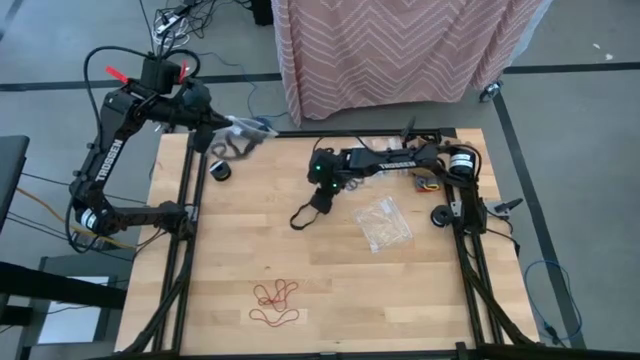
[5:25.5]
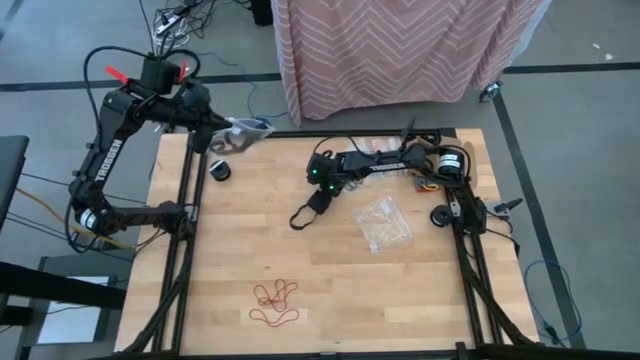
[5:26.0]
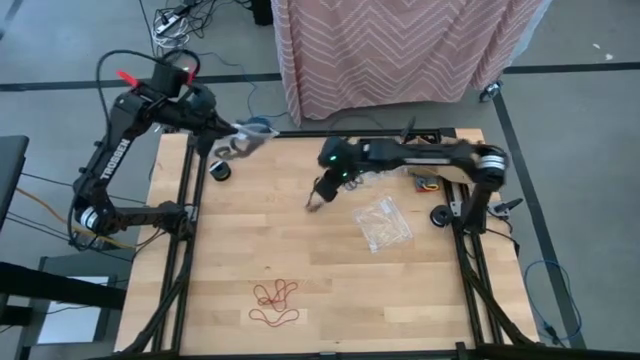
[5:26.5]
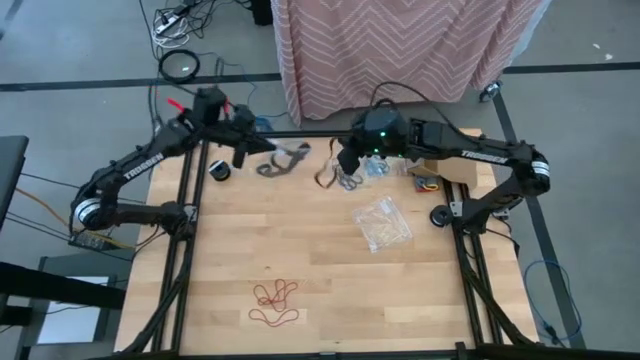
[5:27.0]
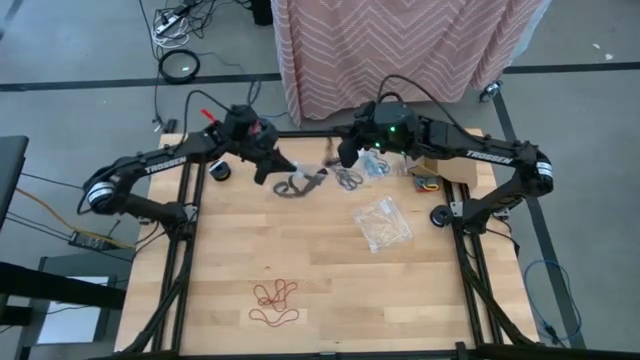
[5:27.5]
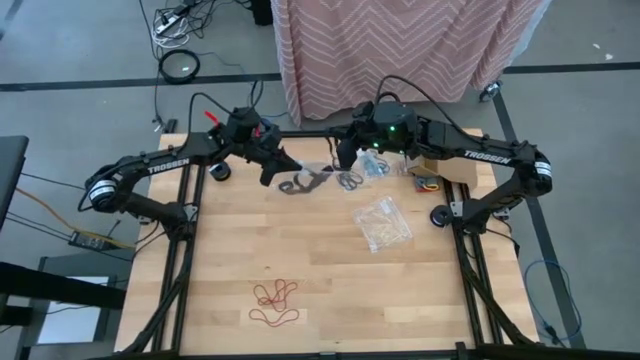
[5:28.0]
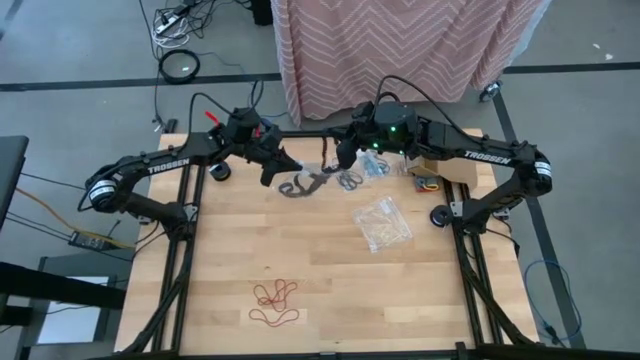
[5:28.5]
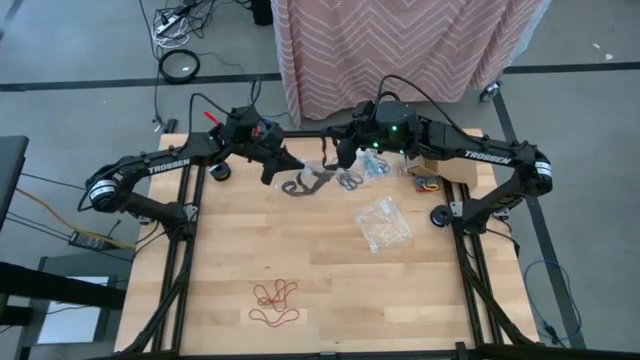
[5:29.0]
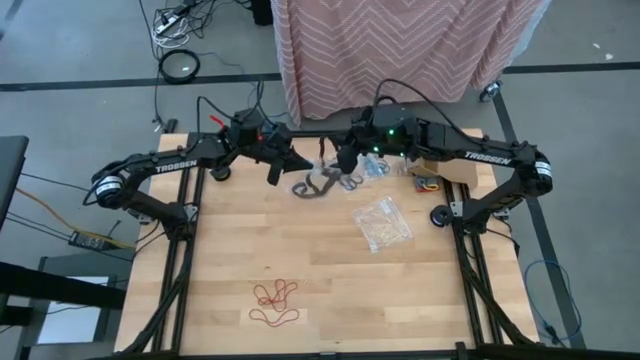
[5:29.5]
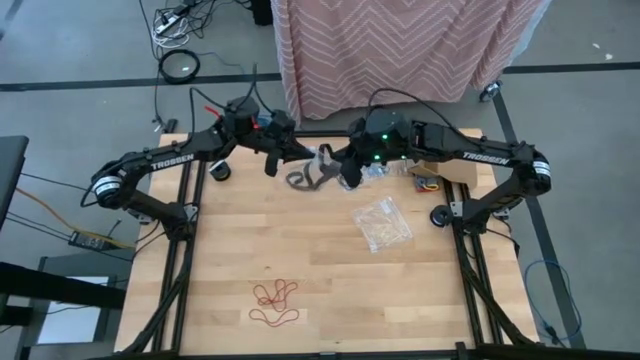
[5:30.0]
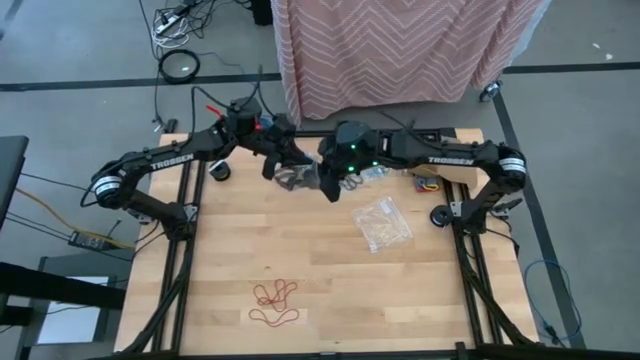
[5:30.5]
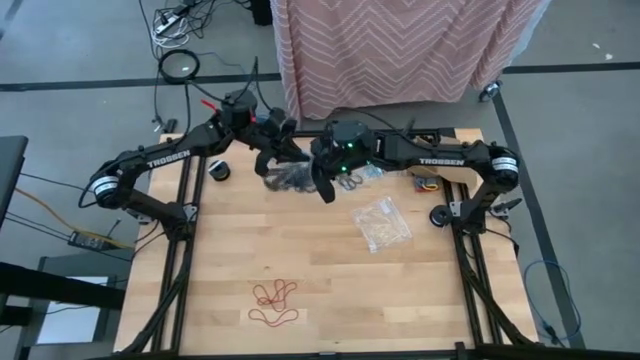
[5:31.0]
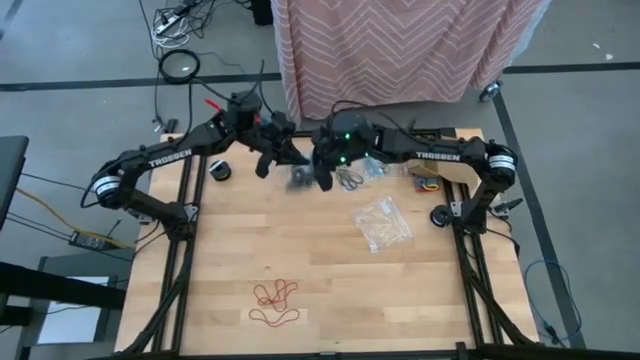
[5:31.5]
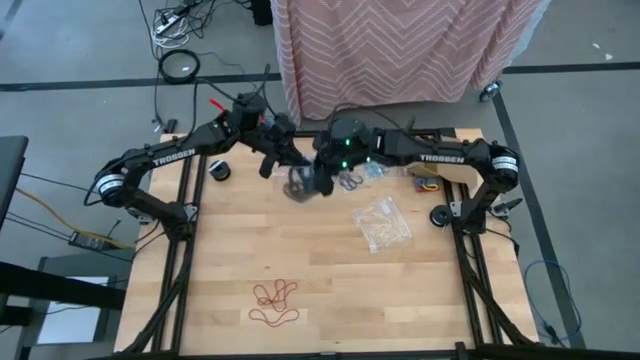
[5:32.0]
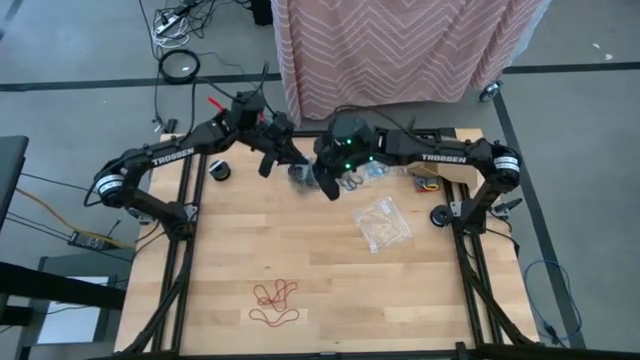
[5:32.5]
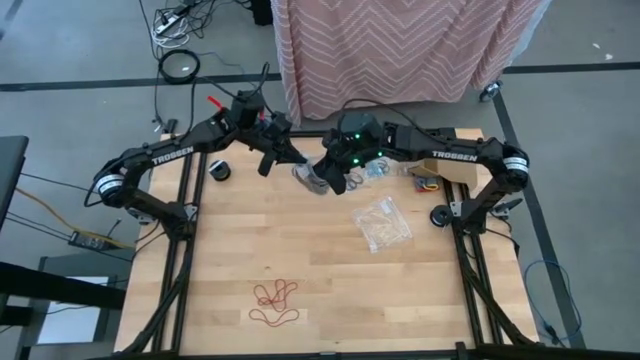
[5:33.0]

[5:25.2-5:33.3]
Task: Sort rubber bands
Put the black rubber band into the left transparent zip bag

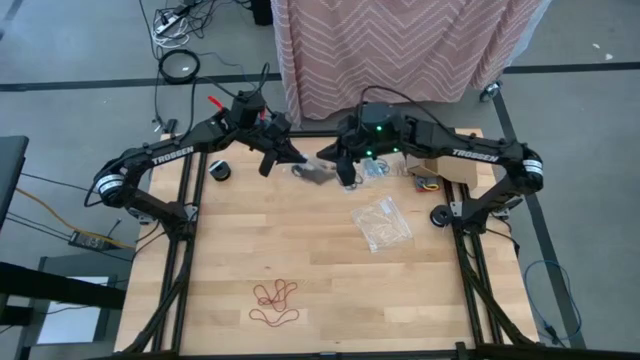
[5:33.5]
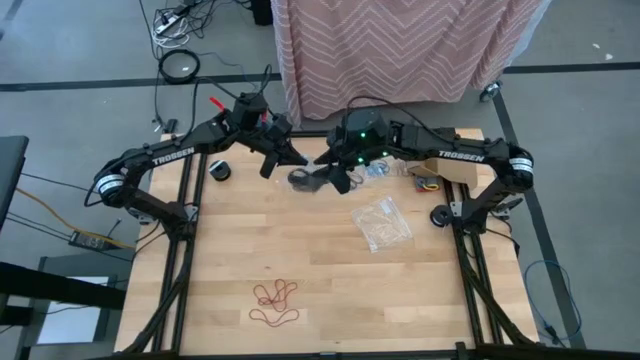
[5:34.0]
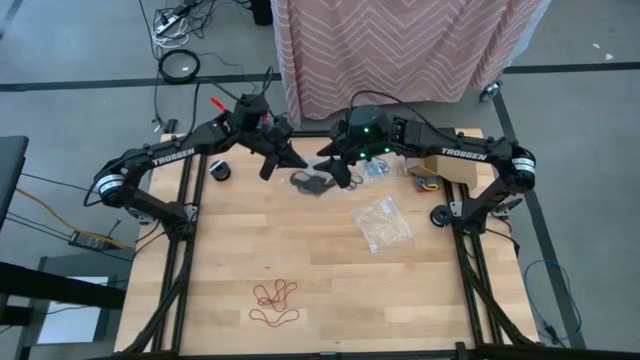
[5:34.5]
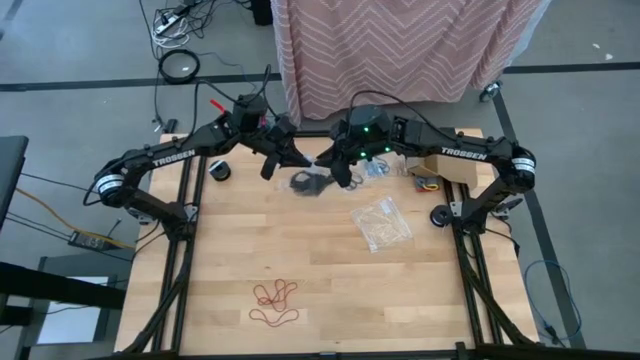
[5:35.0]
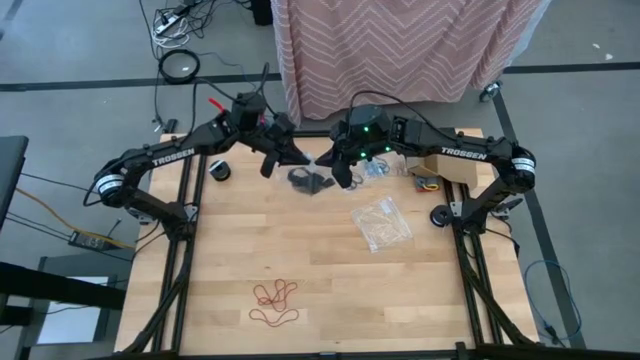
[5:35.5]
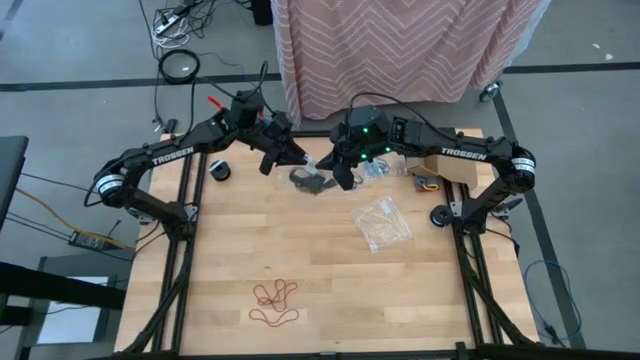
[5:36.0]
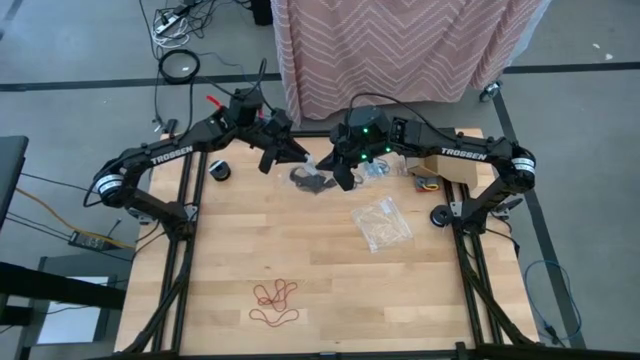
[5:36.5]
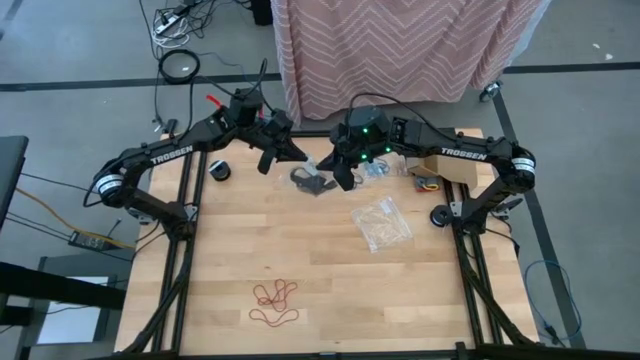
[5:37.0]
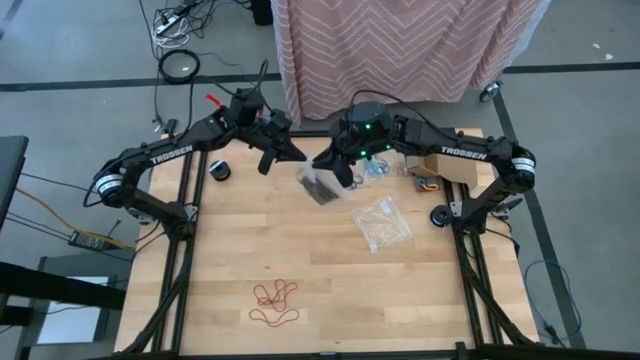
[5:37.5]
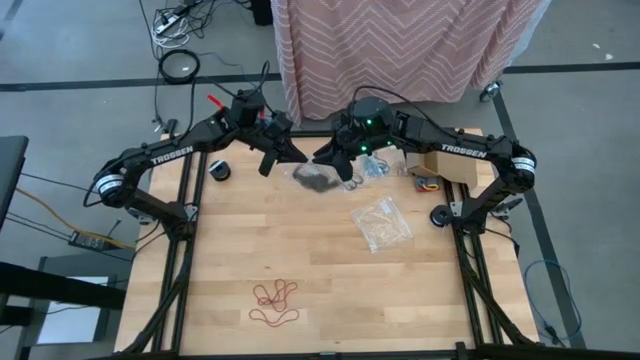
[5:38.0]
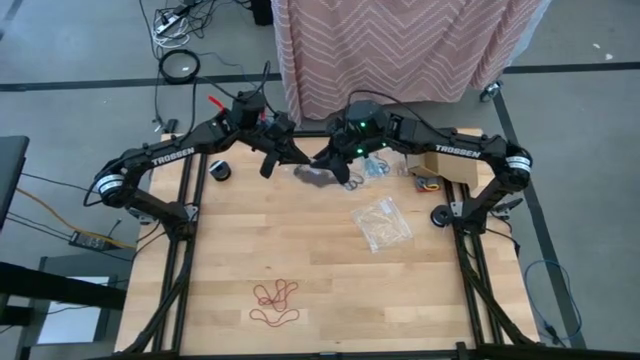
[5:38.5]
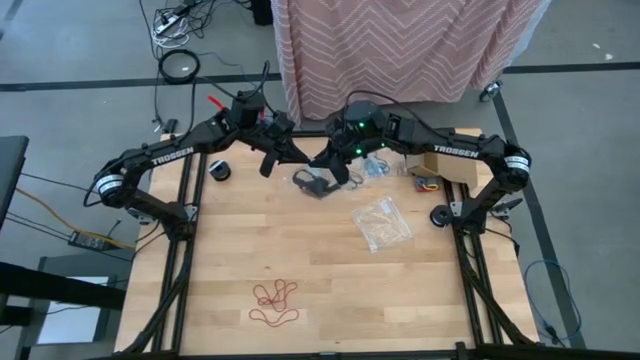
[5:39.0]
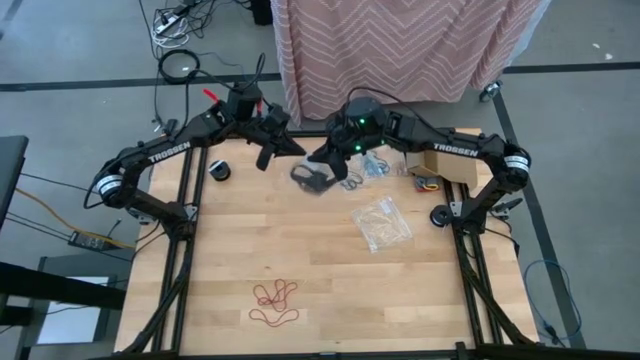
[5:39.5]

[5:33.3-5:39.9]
Close the left transparent zip bag

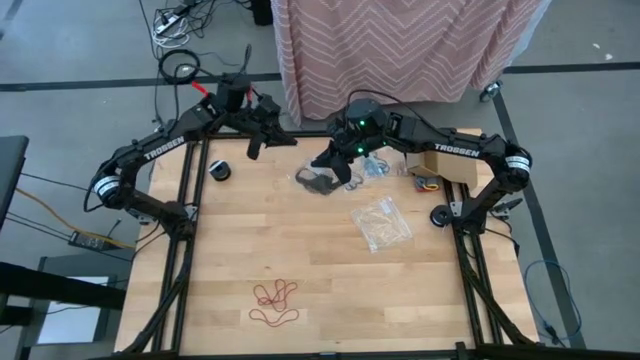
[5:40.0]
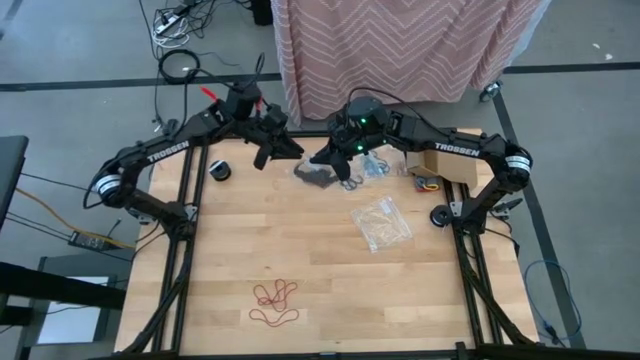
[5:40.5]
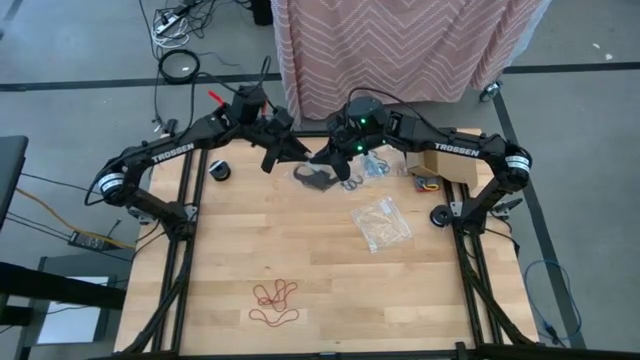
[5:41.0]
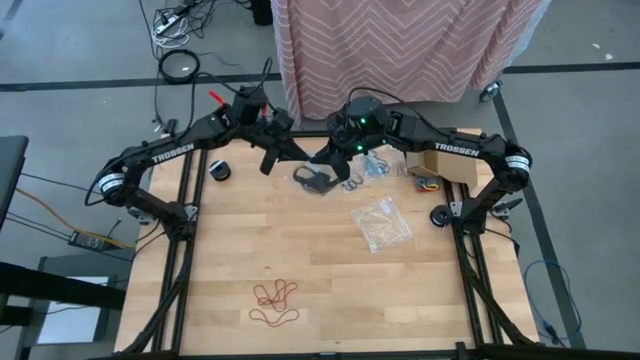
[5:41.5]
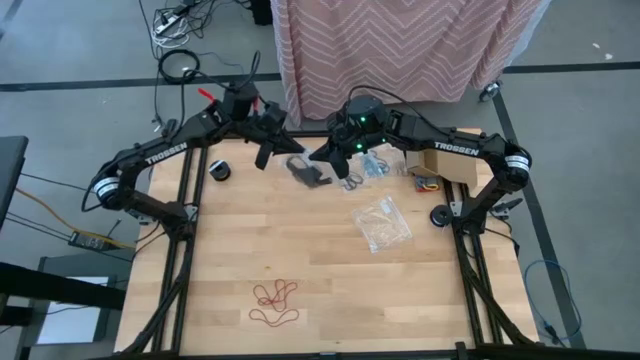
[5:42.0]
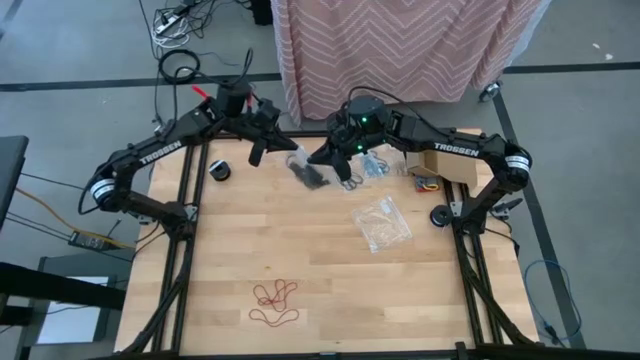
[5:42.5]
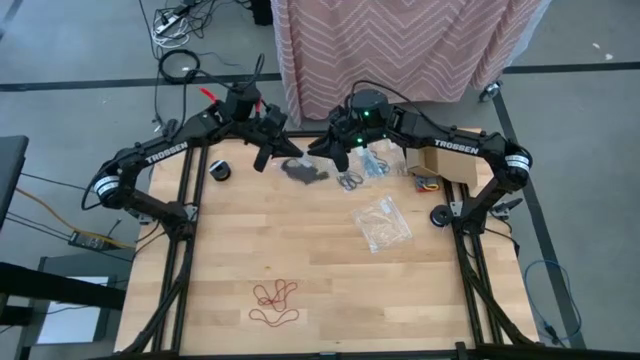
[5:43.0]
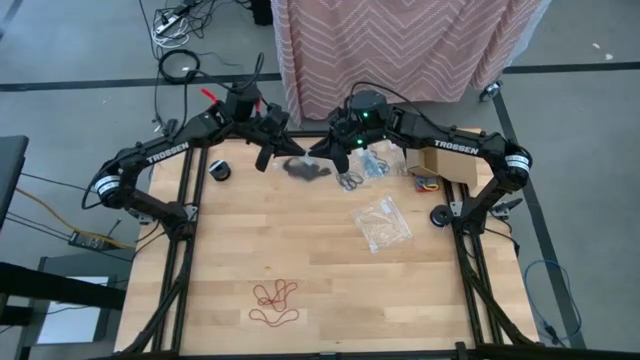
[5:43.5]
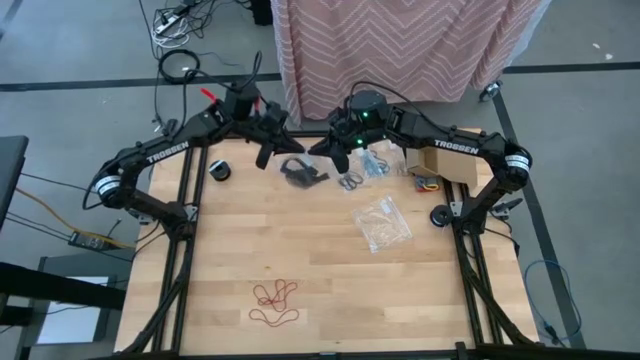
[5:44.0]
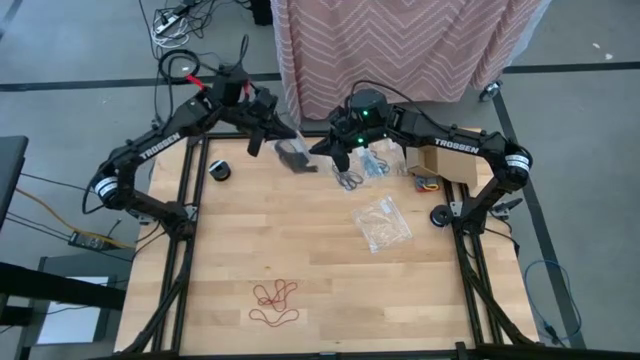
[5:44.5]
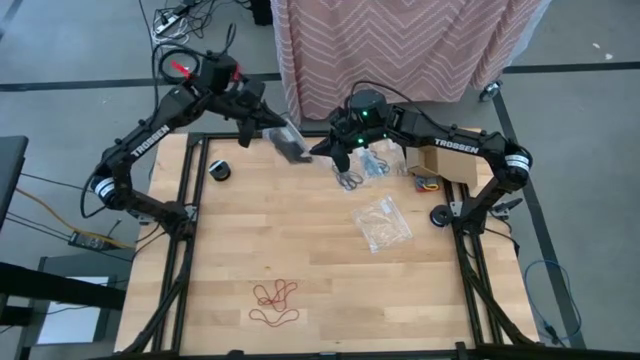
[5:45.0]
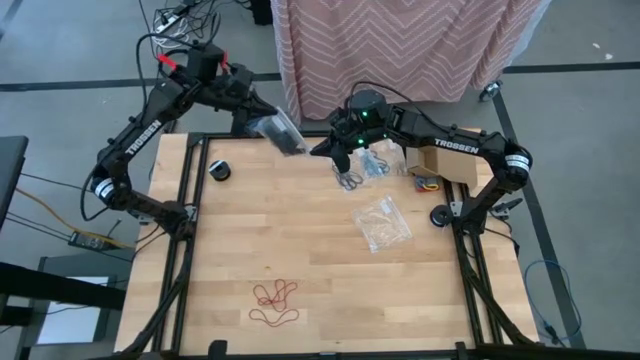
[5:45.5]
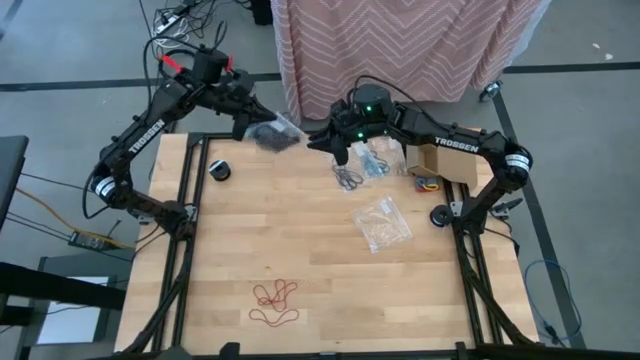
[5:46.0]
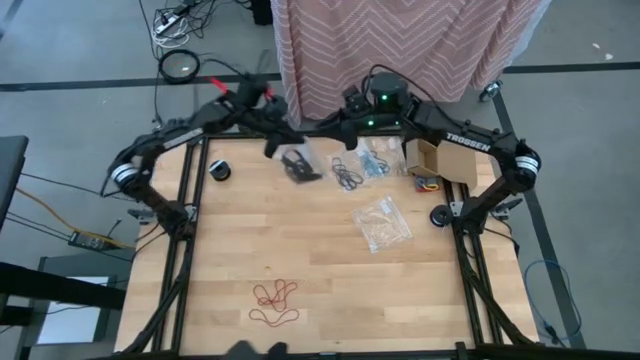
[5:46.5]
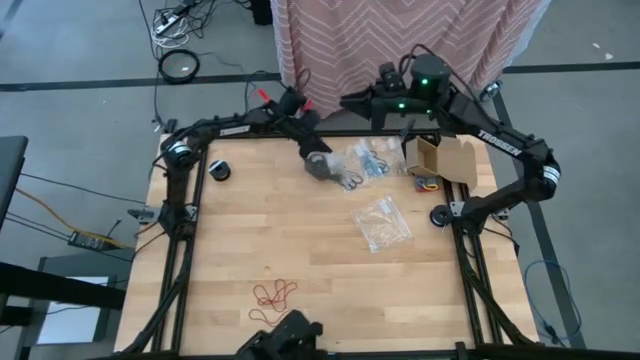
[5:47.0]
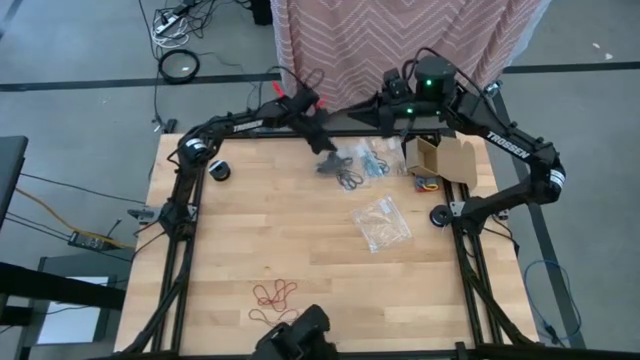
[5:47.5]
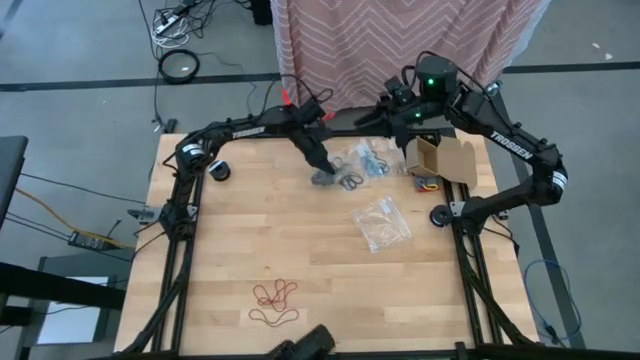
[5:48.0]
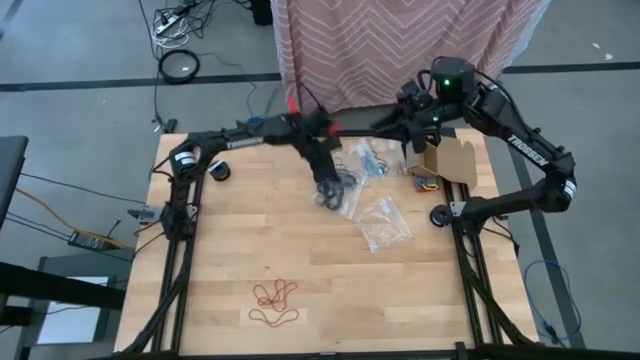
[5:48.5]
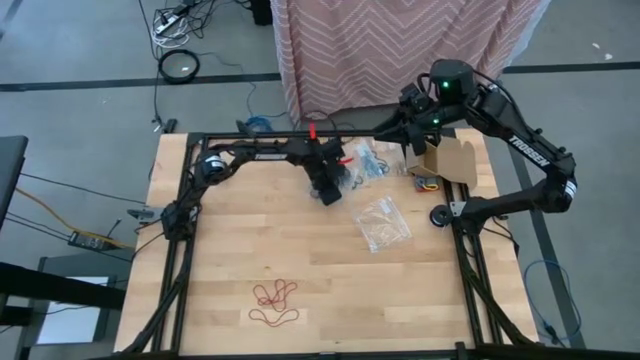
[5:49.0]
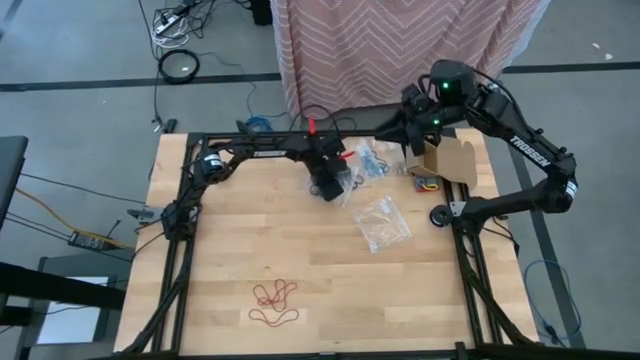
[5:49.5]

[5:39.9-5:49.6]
Close the left transparent zip bag
